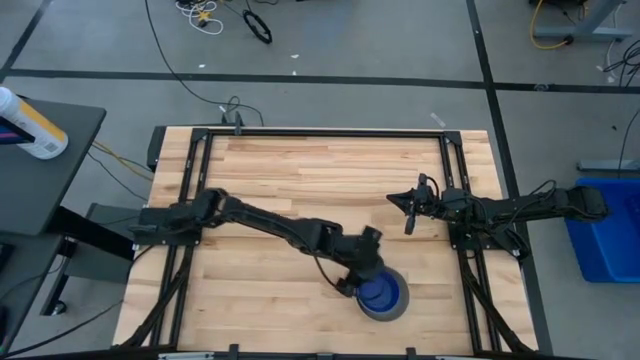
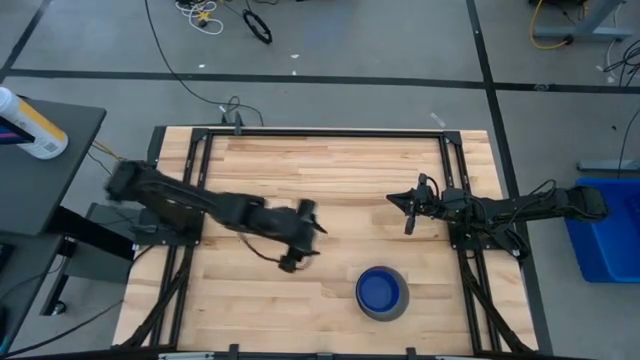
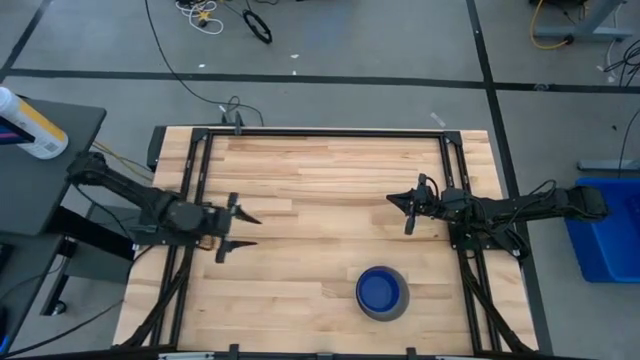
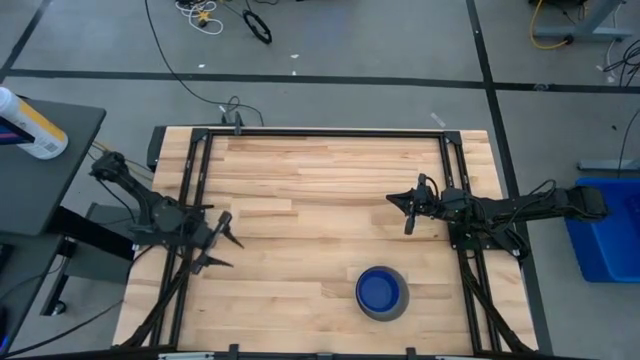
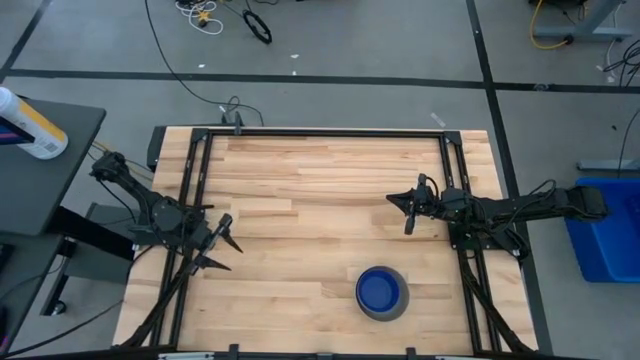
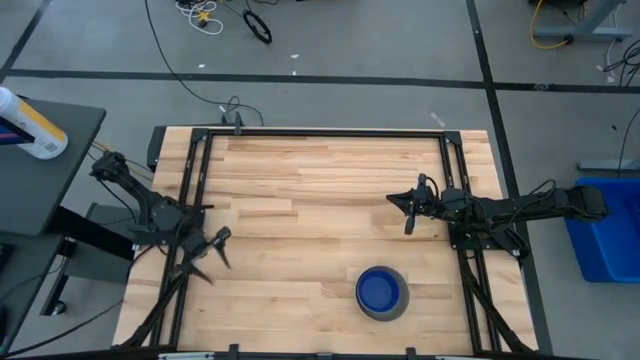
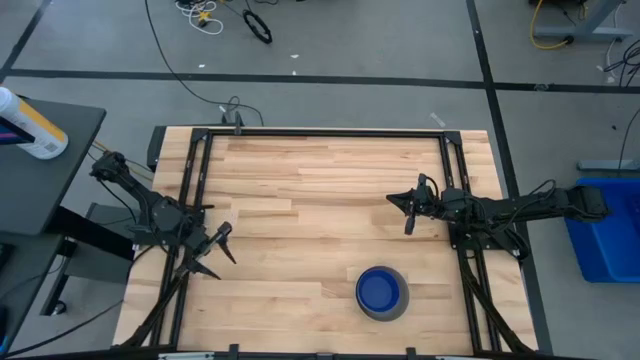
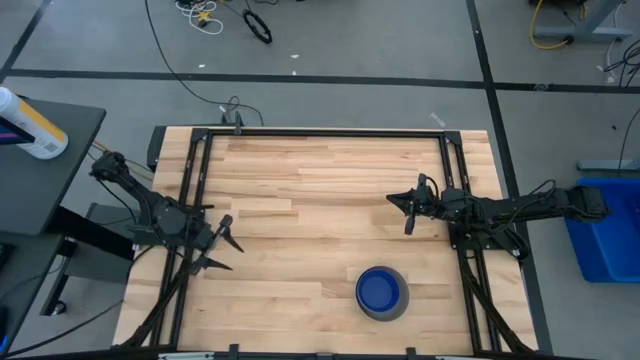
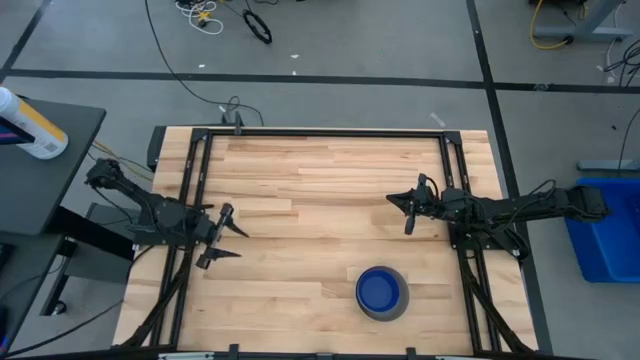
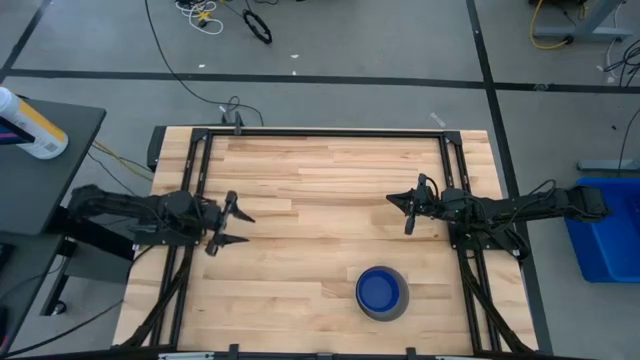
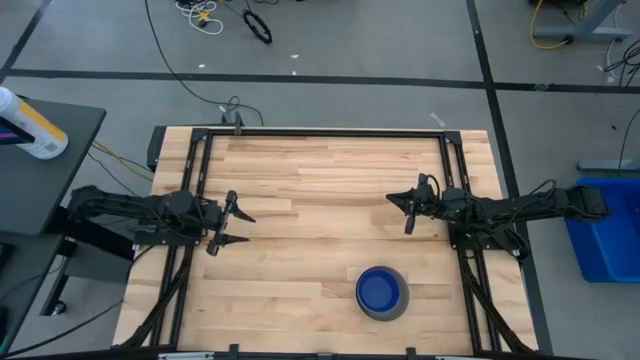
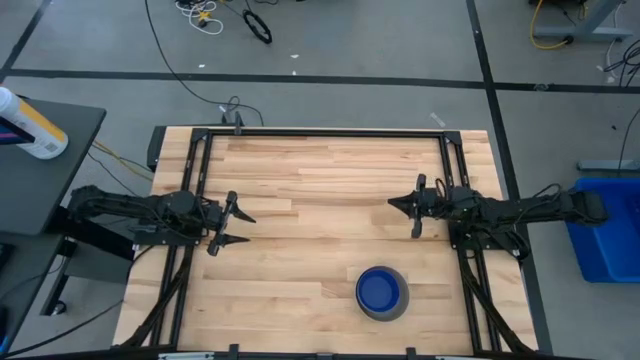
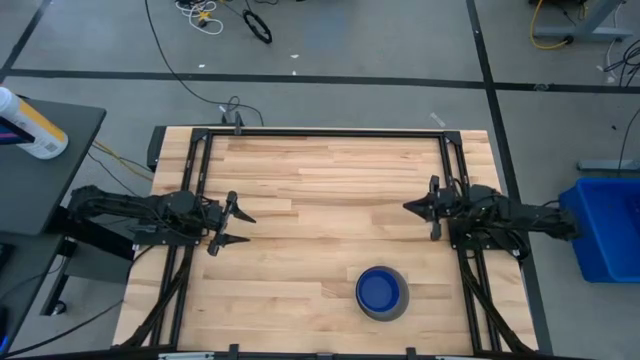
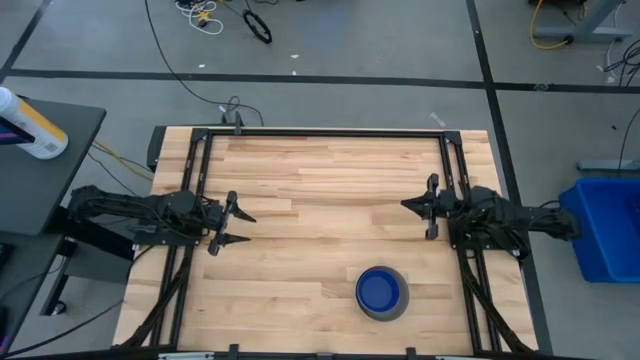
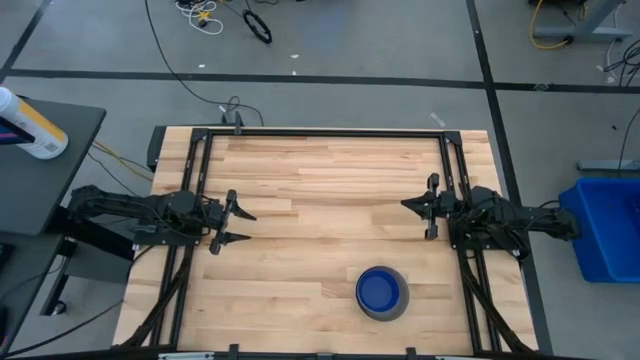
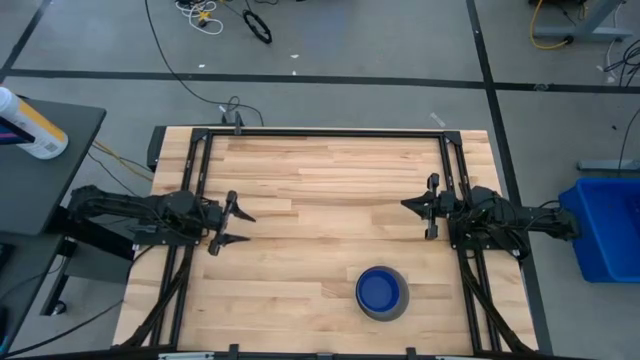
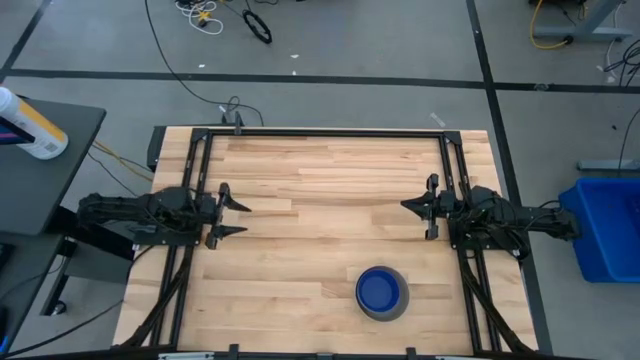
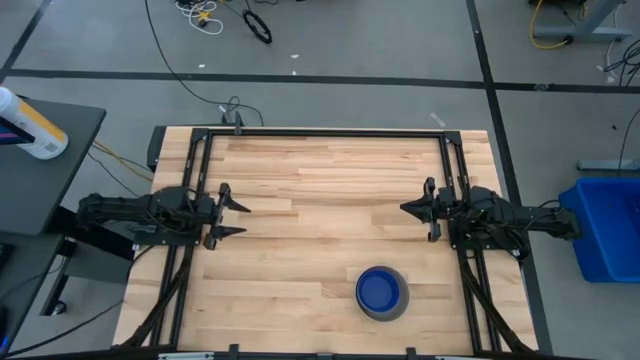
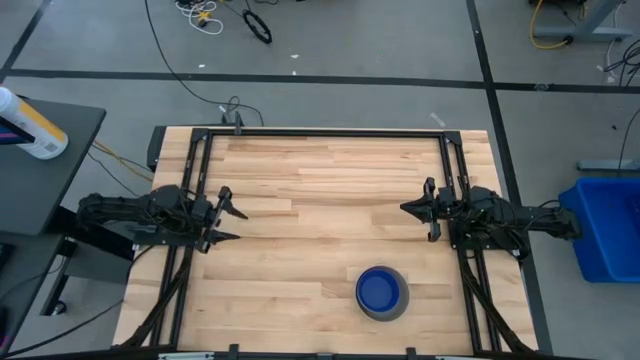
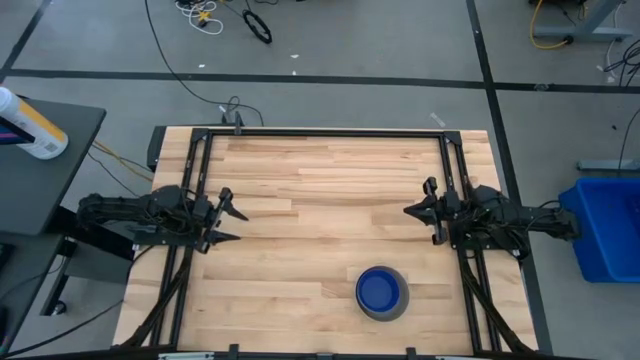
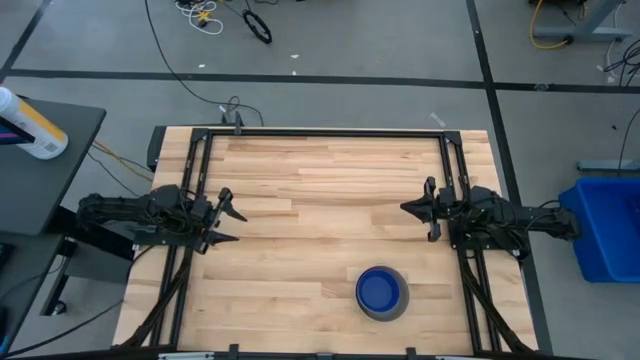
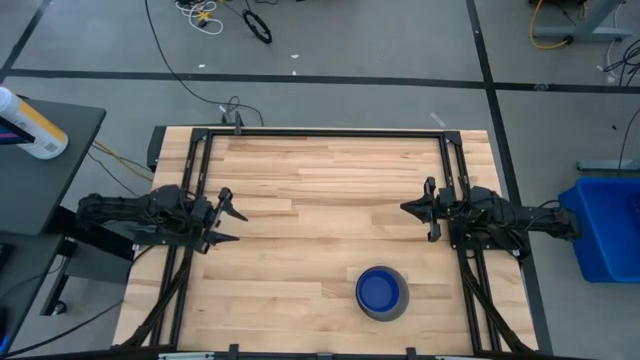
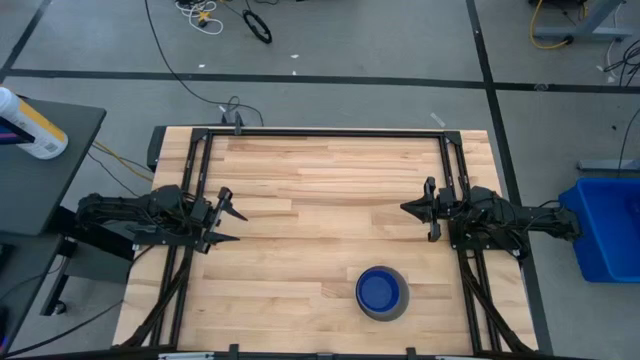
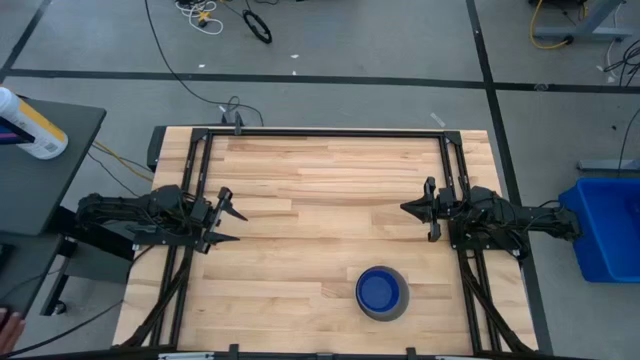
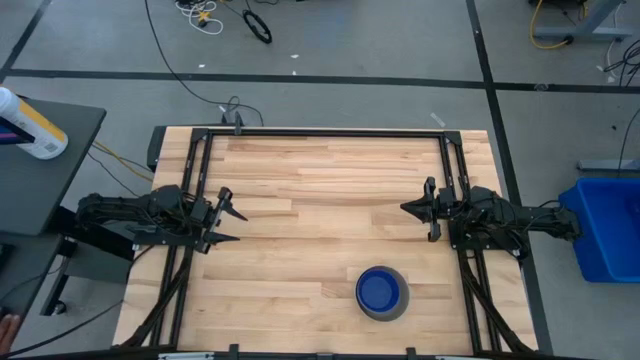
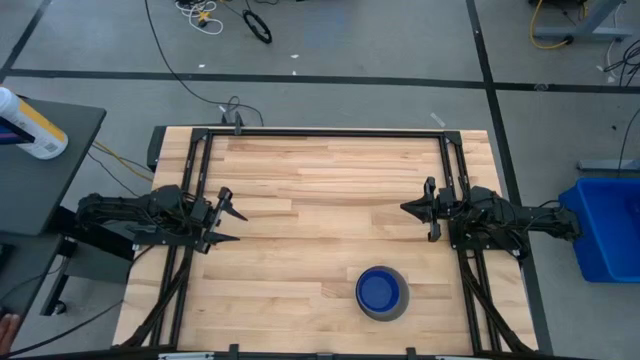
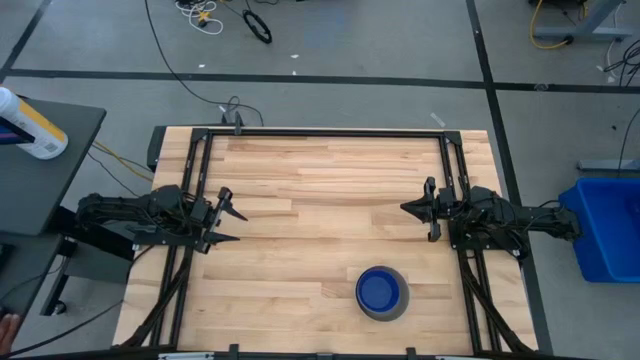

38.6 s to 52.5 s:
Return to Home Position

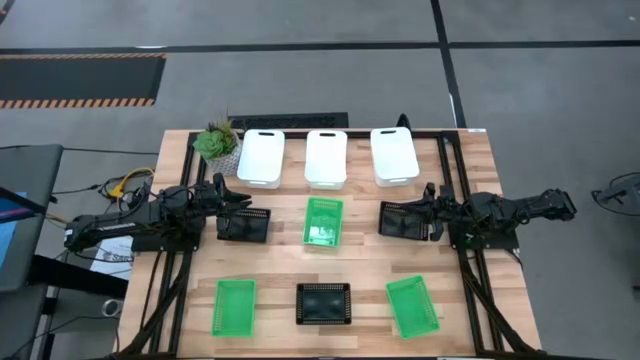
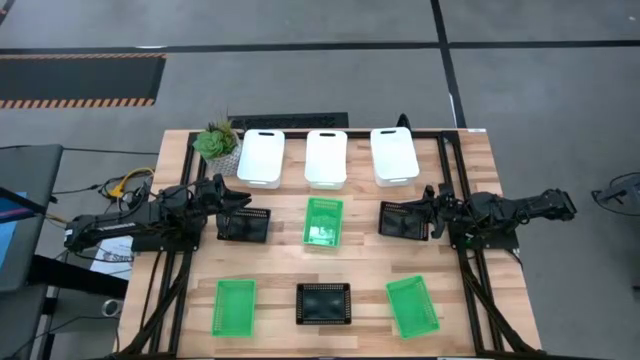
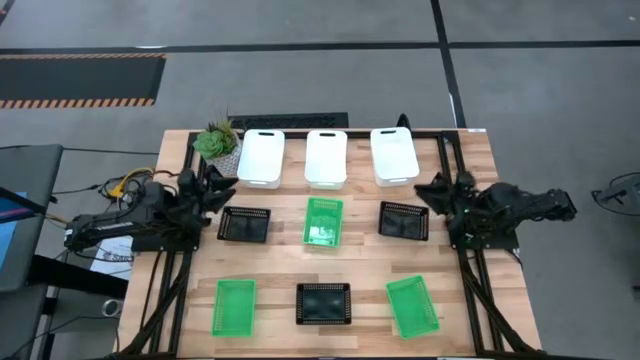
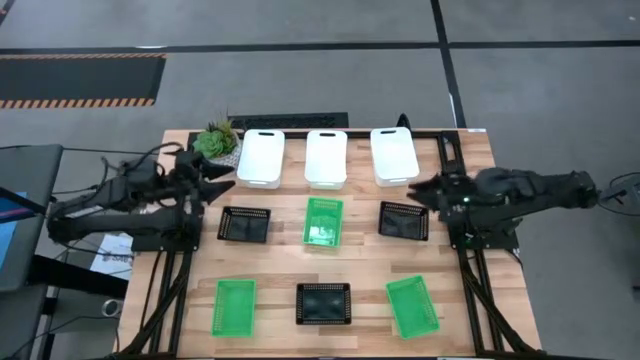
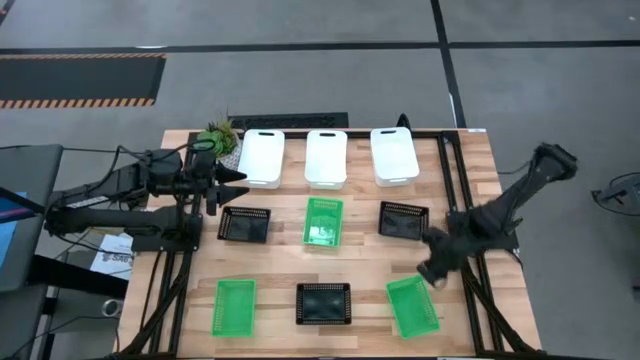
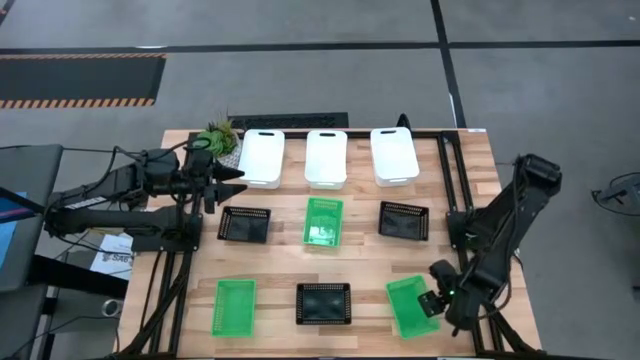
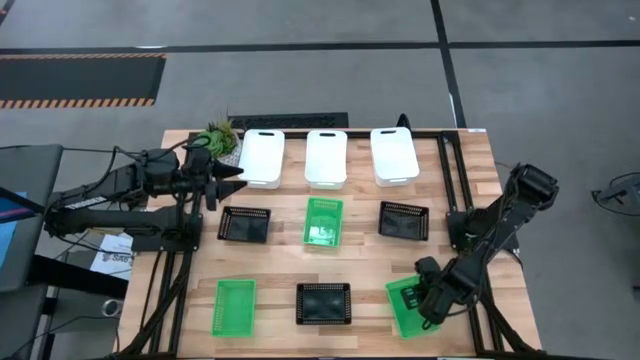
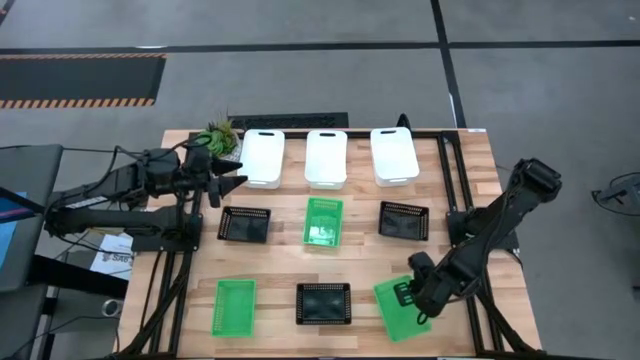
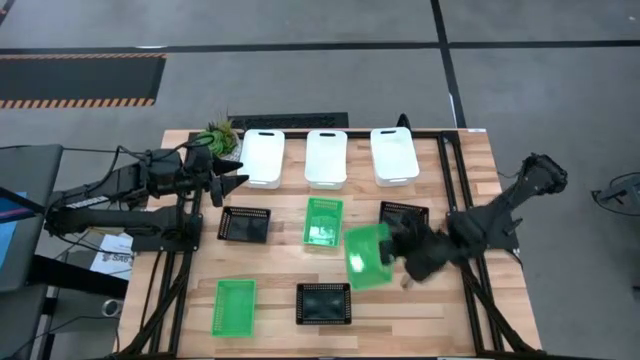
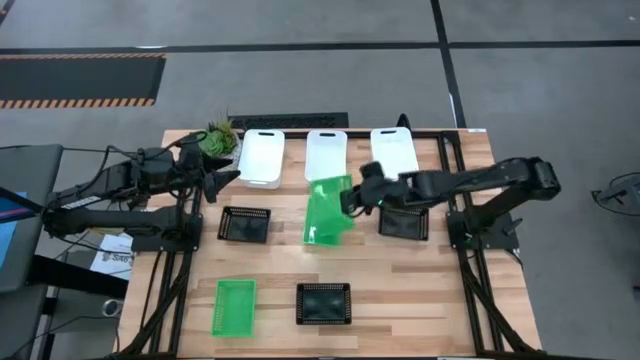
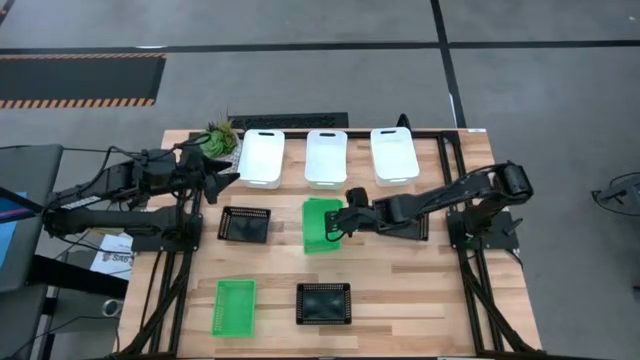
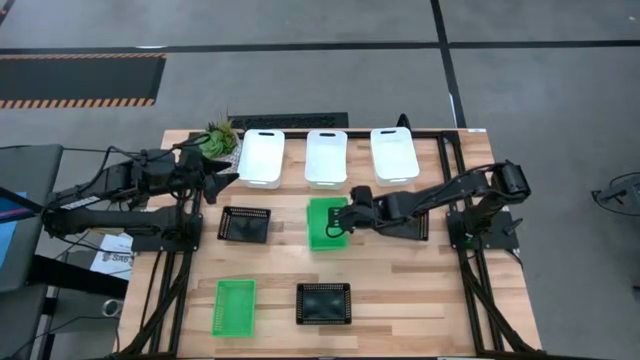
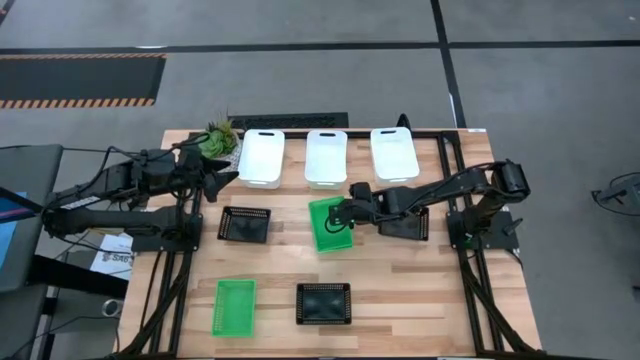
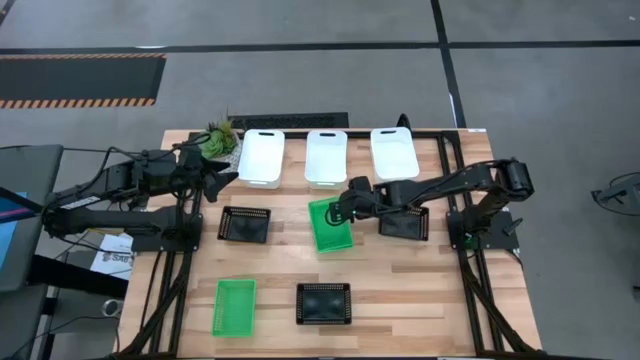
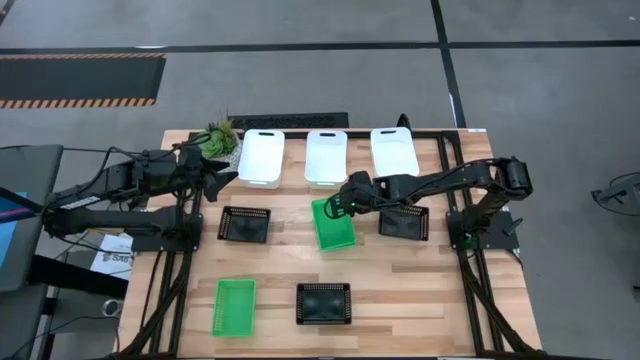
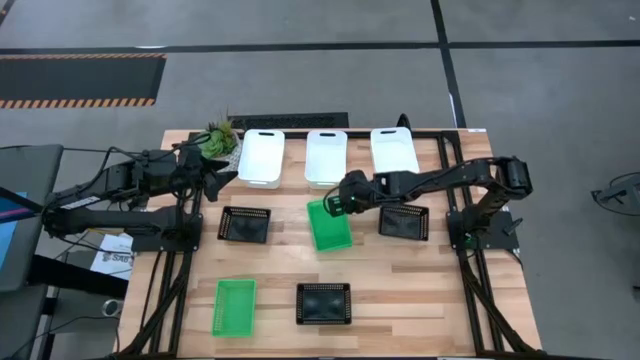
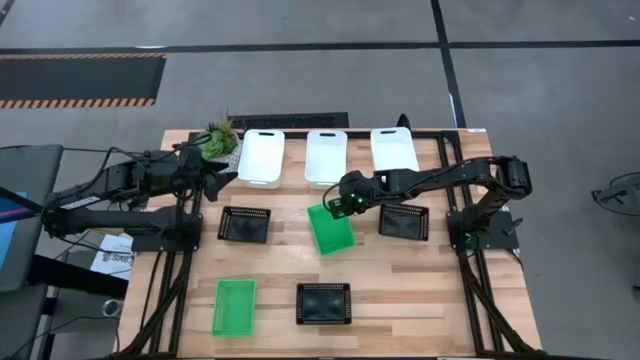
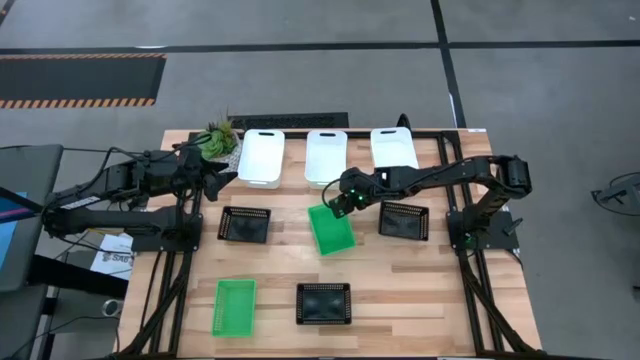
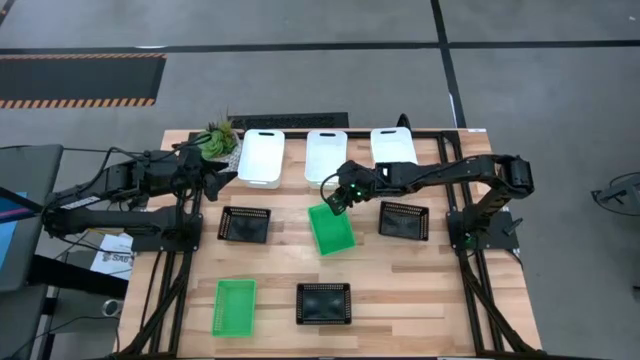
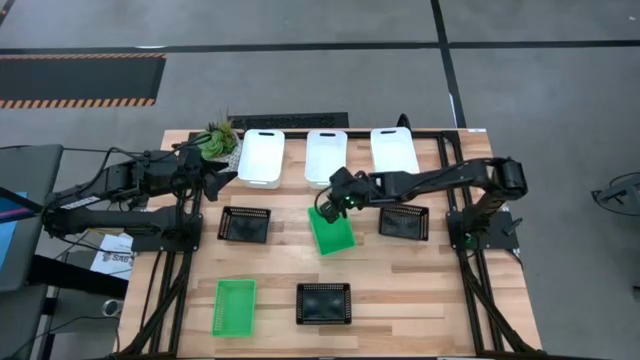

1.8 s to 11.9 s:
Stack the bottom right green bin on the top green bin
